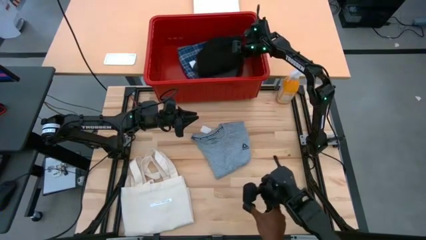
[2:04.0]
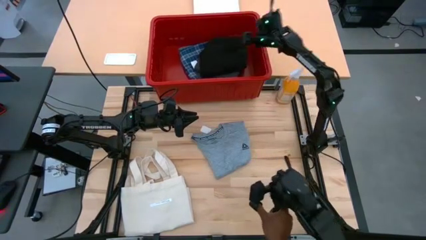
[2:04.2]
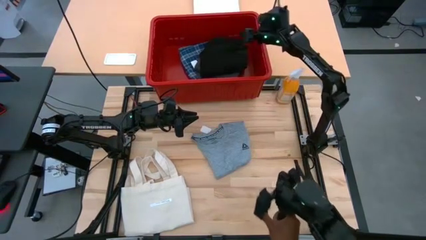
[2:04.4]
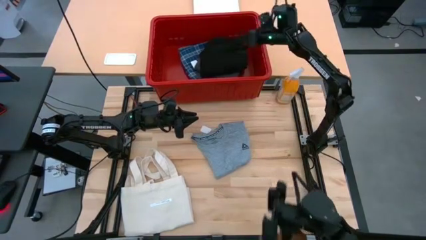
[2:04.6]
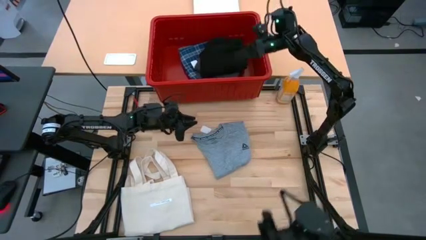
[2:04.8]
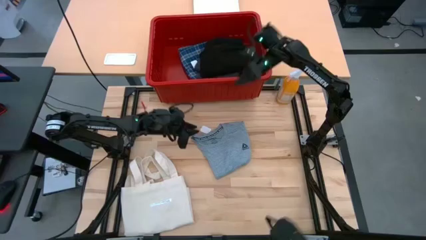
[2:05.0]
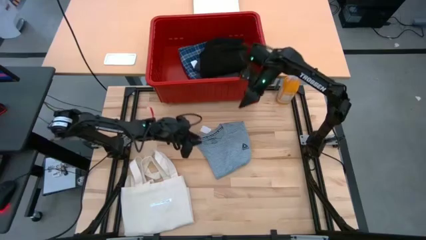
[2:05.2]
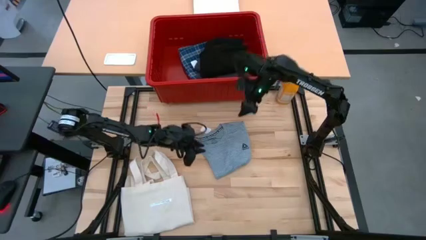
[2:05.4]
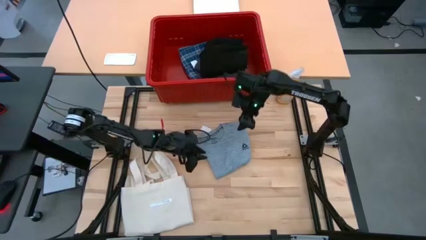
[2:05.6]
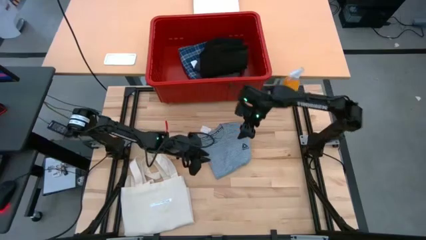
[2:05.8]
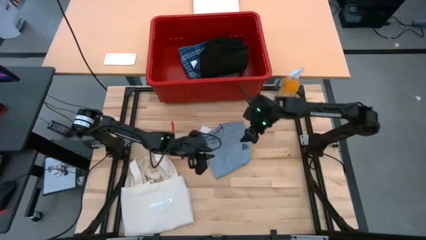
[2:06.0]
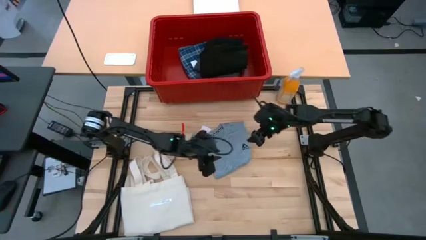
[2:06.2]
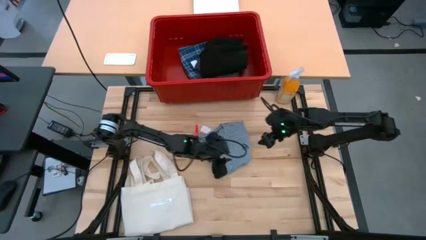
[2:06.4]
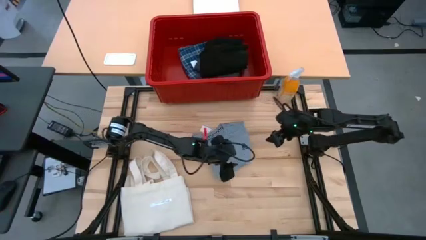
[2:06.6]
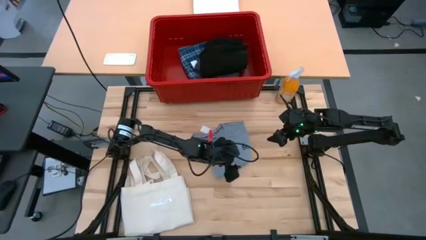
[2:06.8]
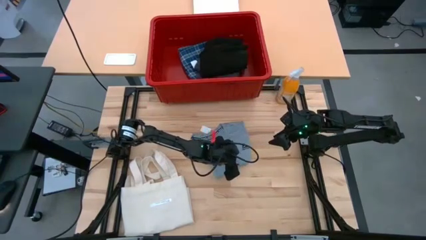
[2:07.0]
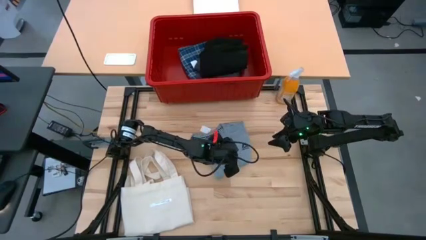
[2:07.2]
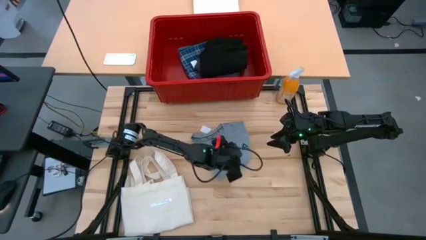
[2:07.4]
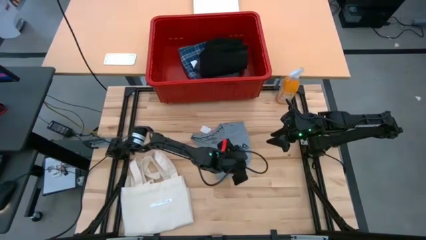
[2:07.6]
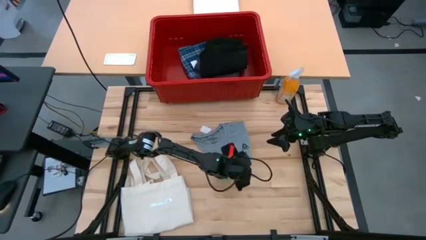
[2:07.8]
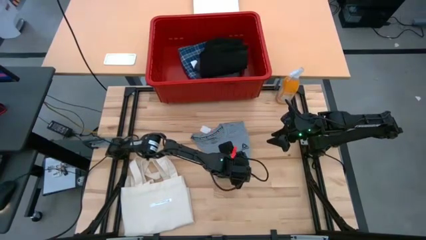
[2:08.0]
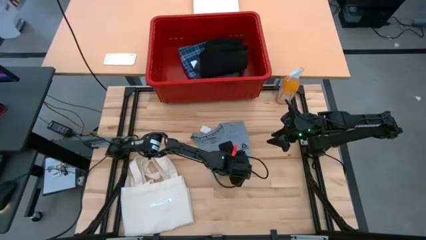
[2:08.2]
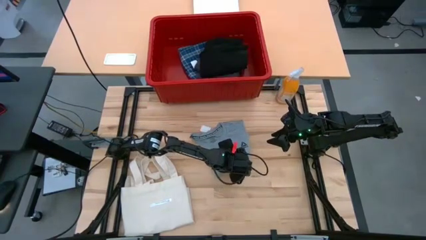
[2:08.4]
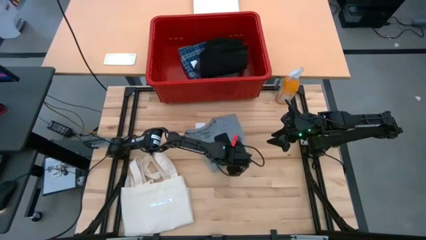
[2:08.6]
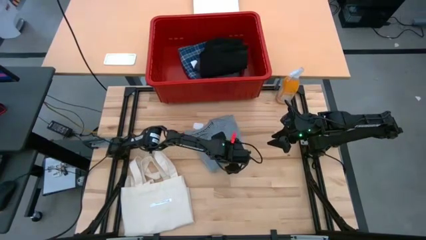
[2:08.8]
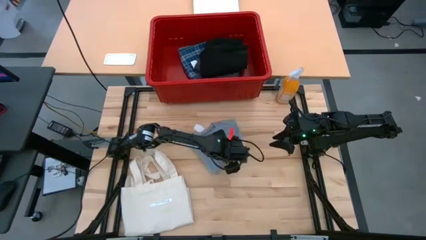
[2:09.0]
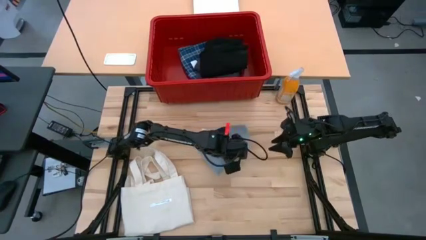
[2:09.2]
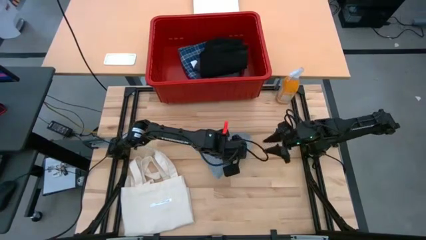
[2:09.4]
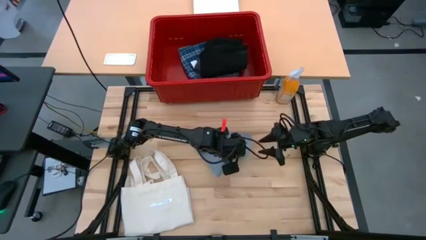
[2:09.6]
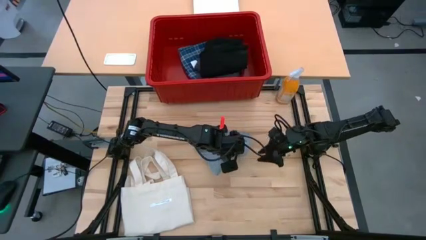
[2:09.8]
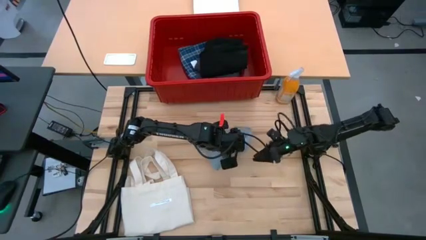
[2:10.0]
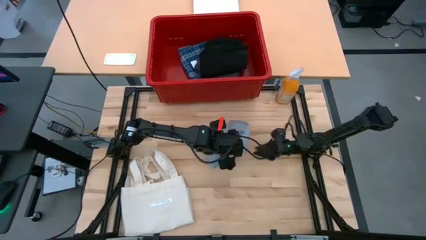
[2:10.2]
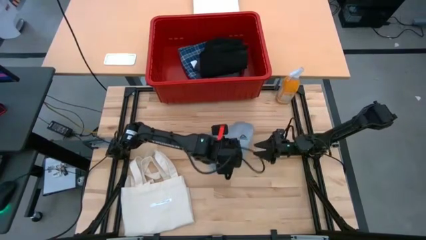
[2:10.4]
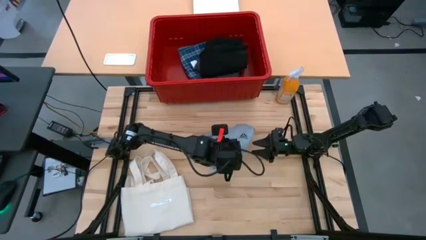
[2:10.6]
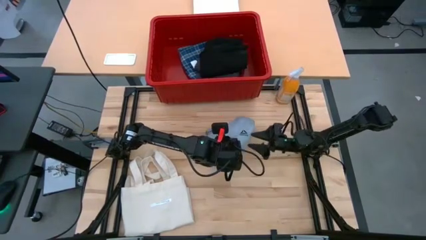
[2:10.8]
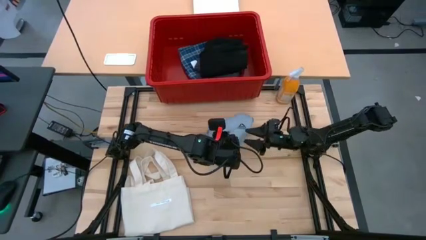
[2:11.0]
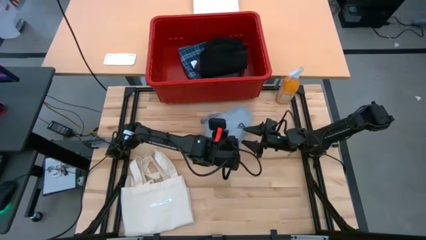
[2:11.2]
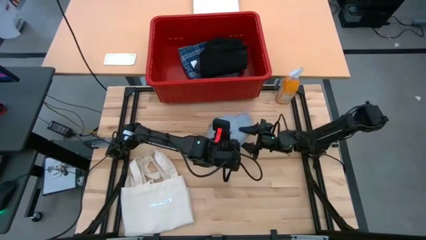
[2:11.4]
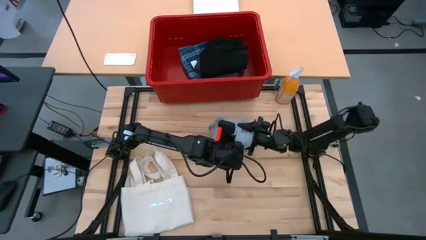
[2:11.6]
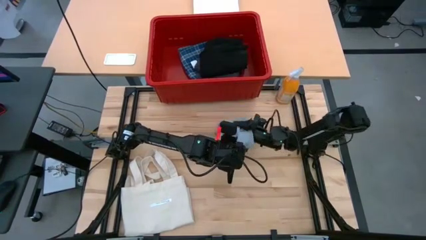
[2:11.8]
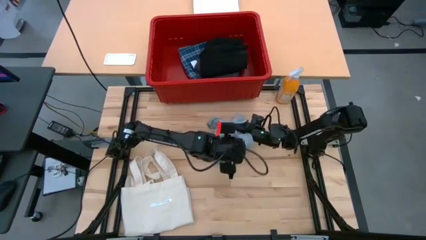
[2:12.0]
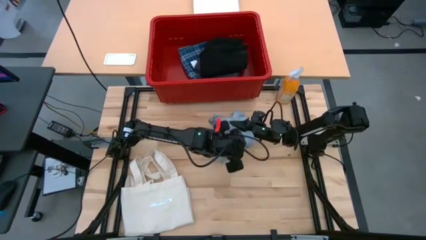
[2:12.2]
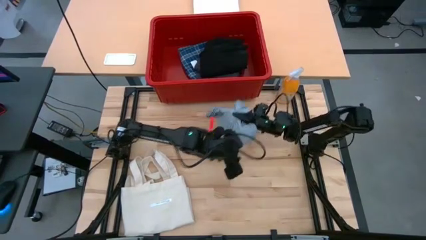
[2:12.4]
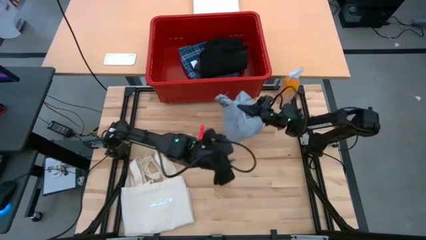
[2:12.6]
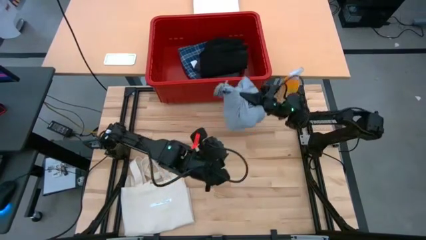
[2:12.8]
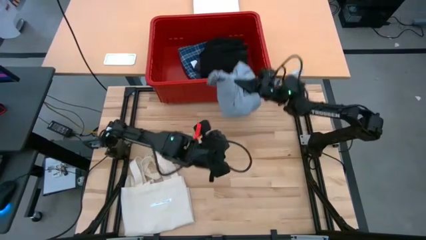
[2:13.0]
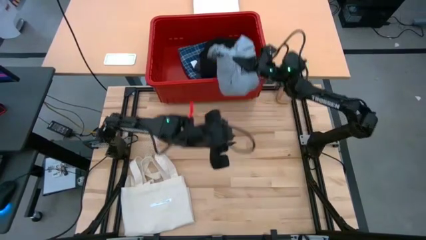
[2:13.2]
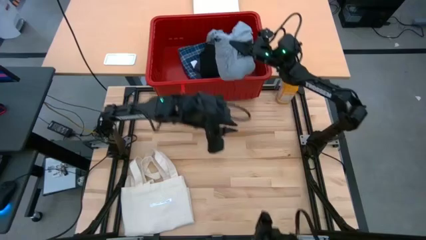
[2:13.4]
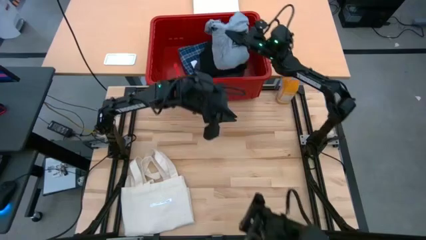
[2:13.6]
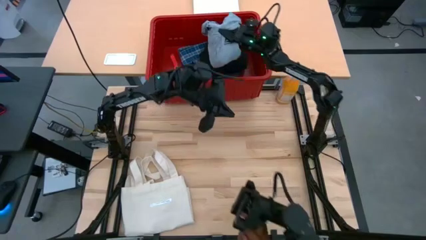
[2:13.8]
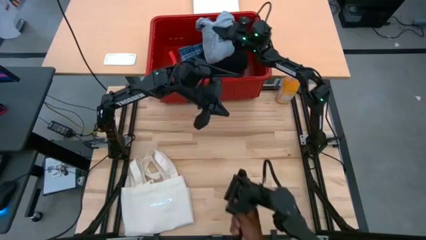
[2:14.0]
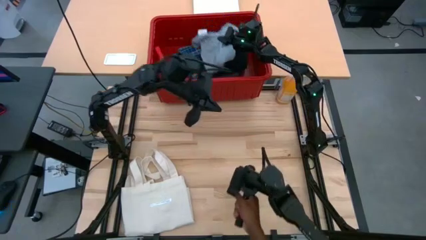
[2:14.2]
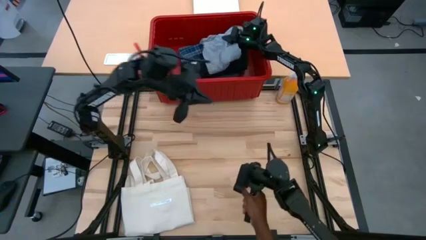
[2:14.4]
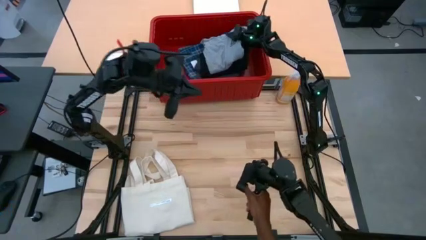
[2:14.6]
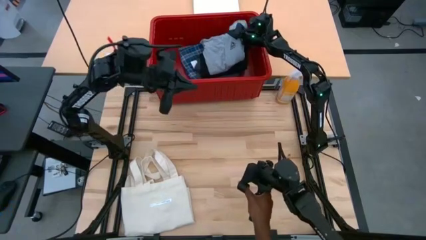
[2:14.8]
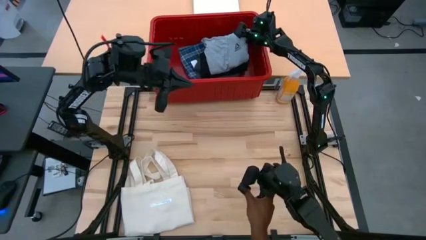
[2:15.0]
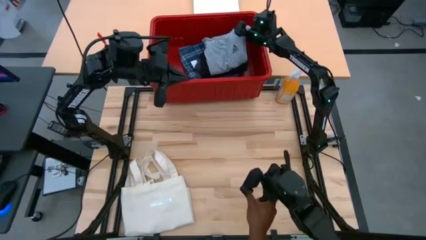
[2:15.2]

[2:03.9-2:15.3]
Task: Fold laundry
Stack the gray t-shirt in the red organizer bin

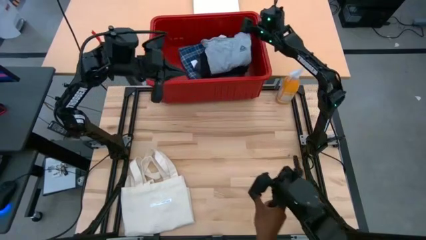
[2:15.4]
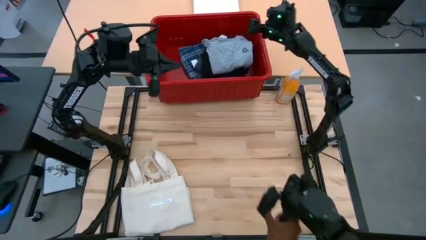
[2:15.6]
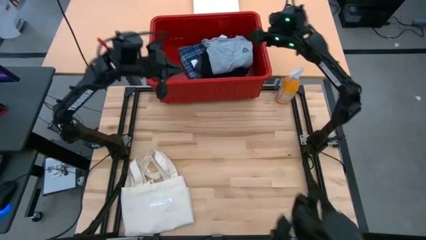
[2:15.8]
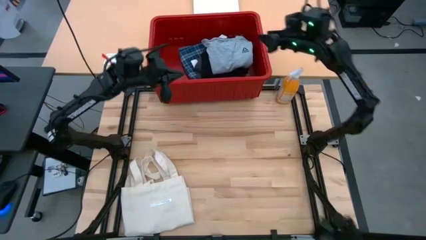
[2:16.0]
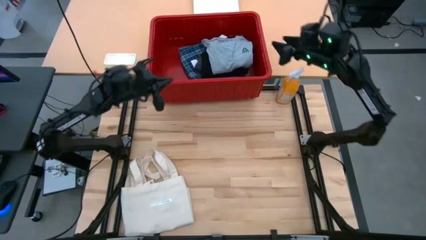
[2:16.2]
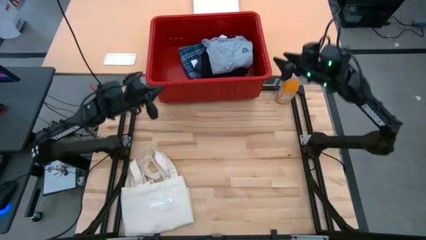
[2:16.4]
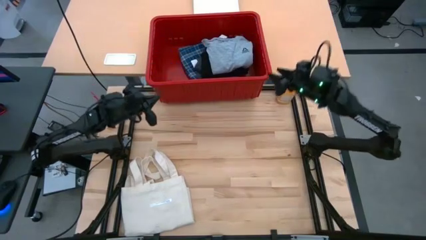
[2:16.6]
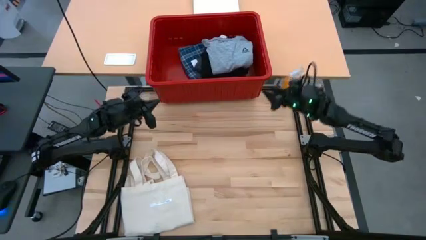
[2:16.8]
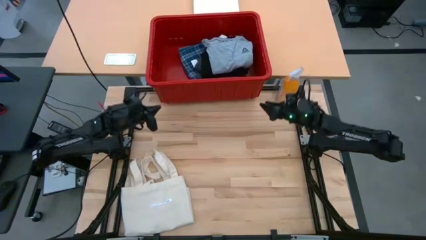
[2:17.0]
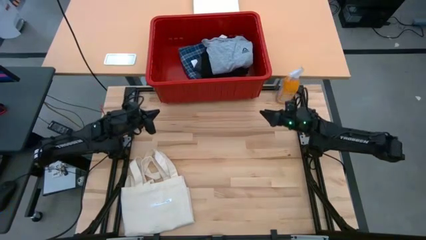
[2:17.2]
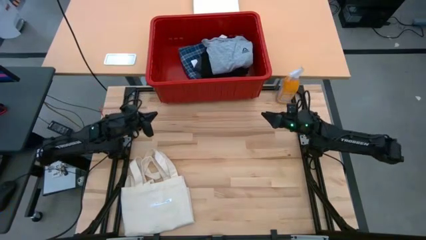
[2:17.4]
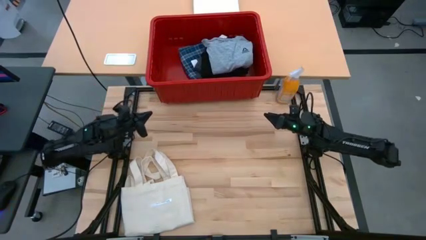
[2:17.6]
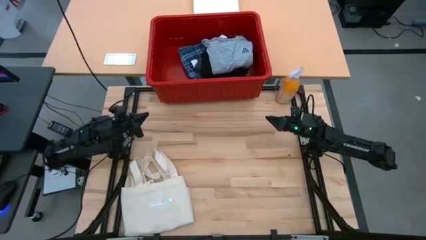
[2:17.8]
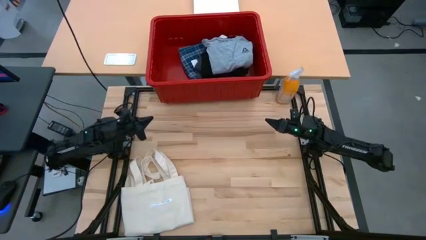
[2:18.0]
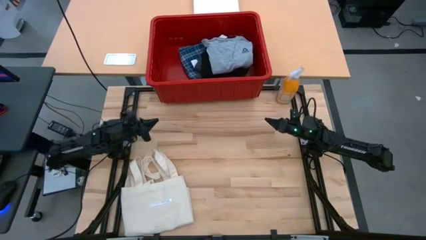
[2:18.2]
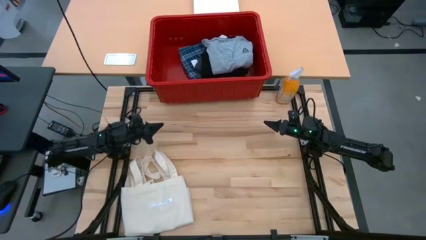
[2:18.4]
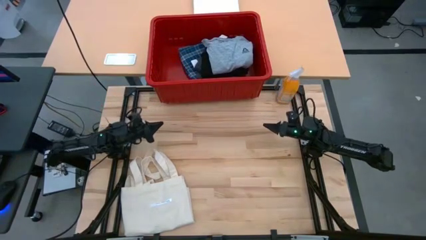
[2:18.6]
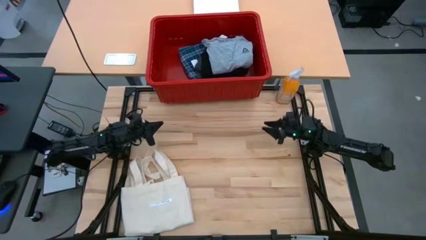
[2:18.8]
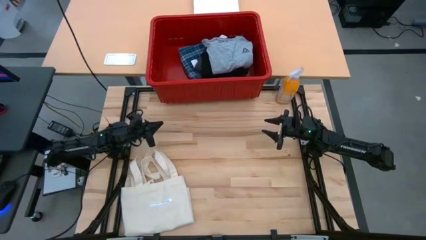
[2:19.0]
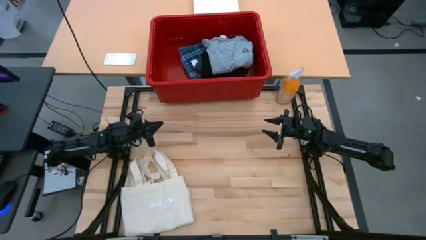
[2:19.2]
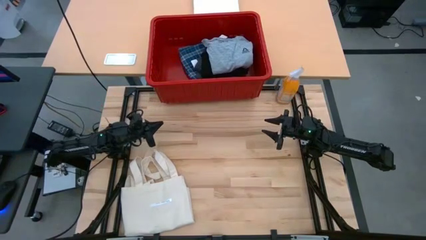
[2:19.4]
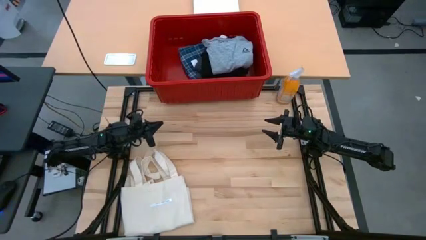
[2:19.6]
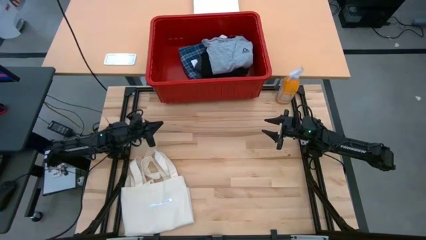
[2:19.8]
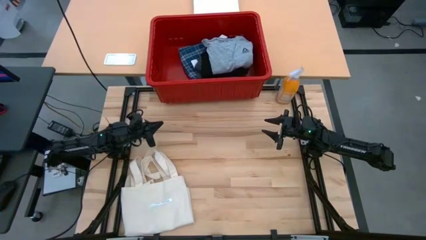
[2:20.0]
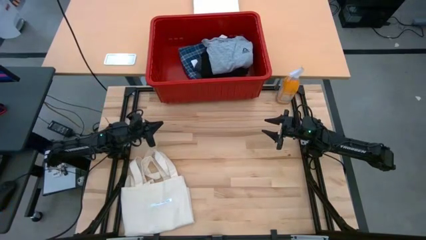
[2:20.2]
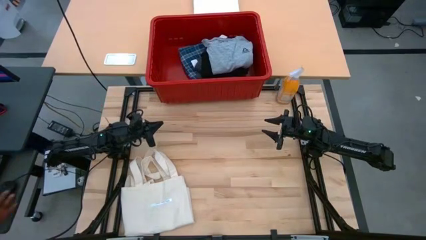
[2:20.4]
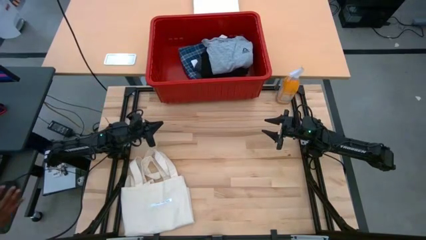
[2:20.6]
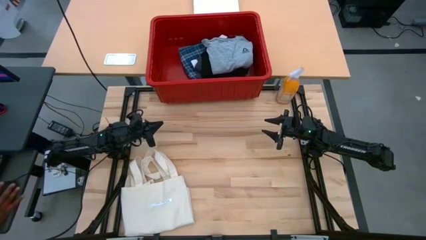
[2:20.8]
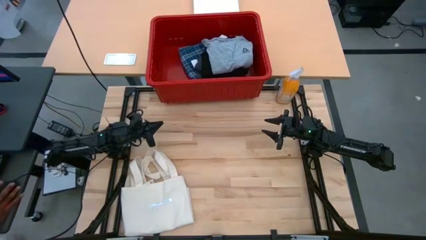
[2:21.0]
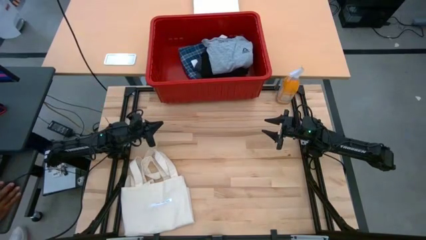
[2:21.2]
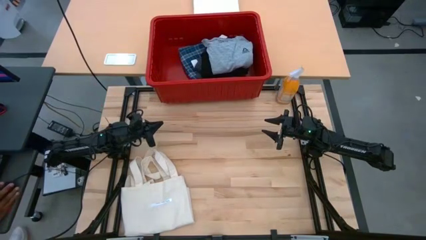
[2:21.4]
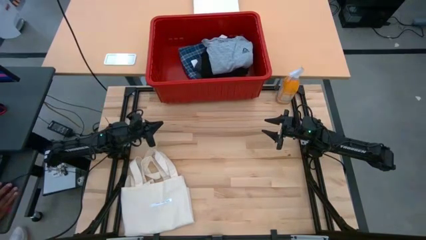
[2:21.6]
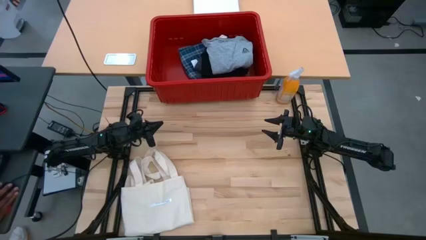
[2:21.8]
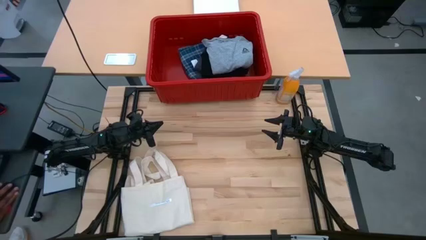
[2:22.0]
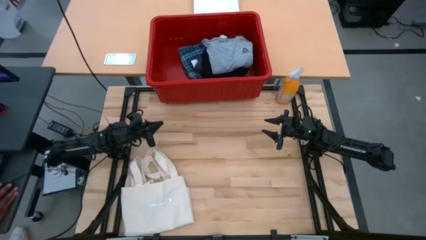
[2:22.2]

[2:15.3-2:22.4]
Return to Home Position
